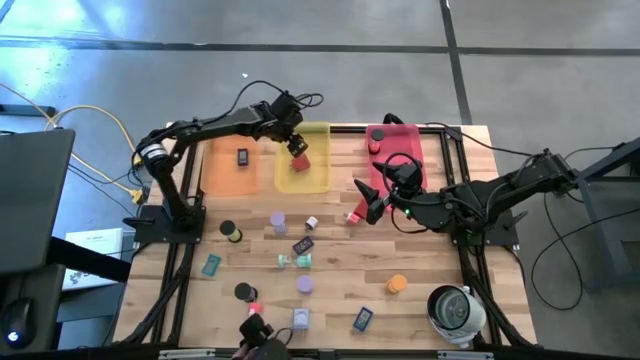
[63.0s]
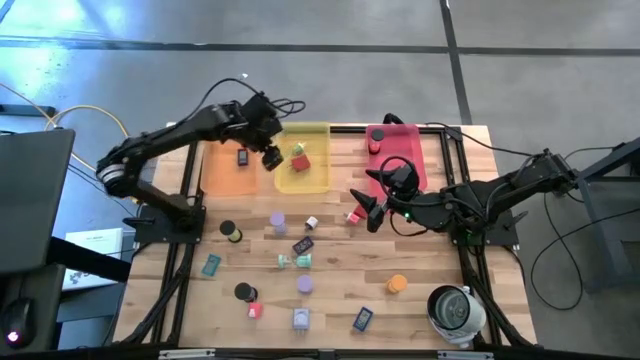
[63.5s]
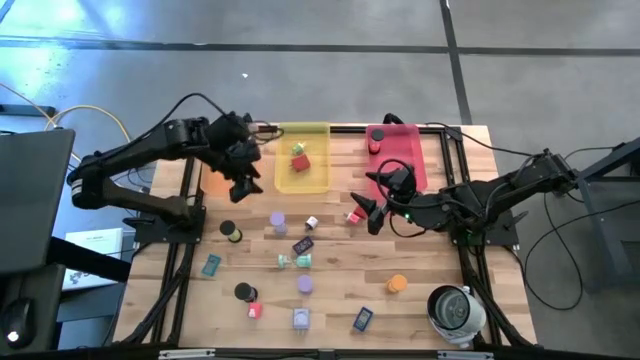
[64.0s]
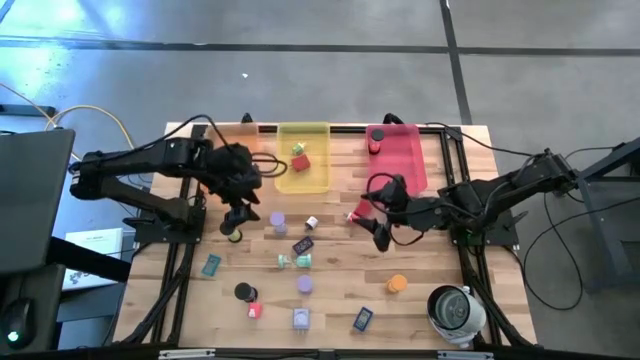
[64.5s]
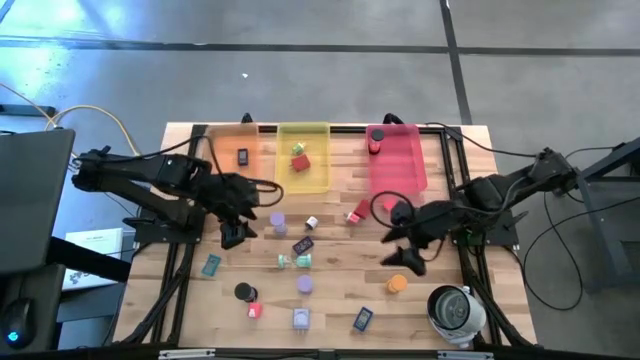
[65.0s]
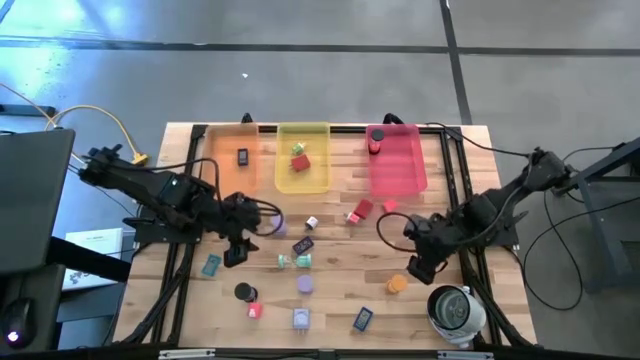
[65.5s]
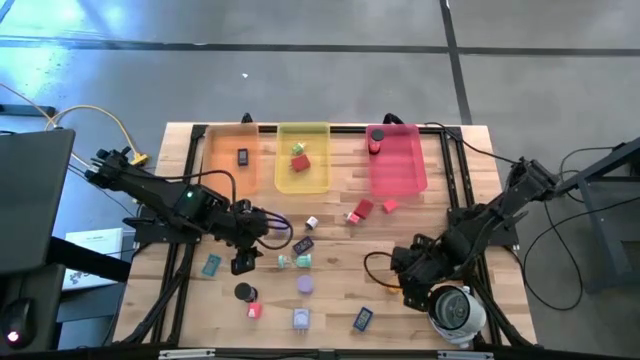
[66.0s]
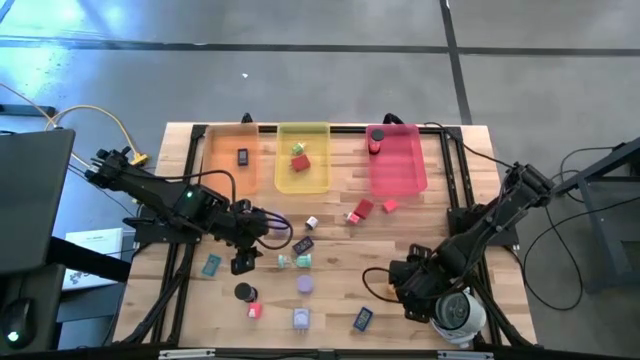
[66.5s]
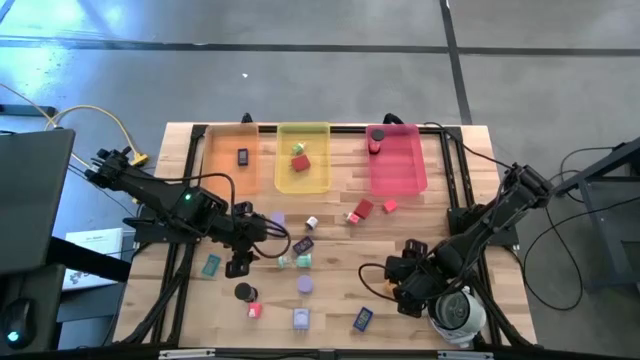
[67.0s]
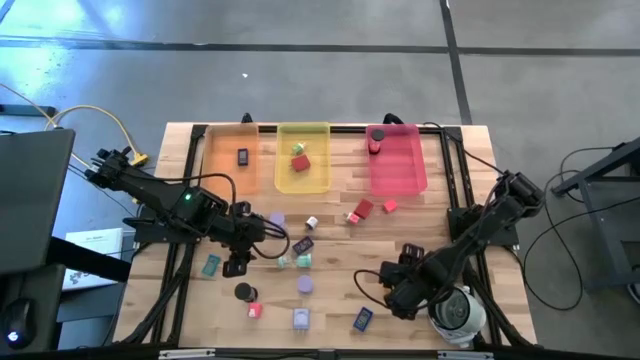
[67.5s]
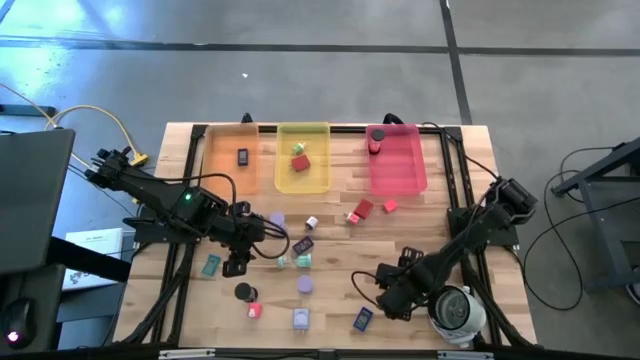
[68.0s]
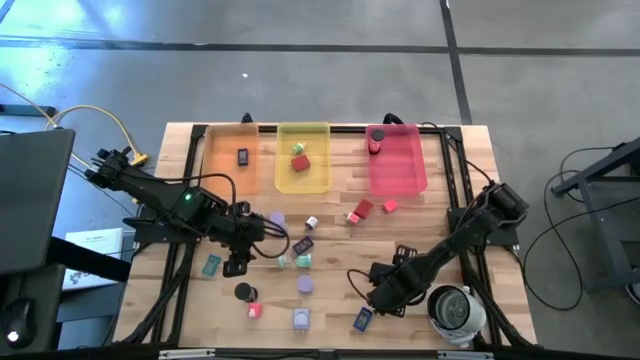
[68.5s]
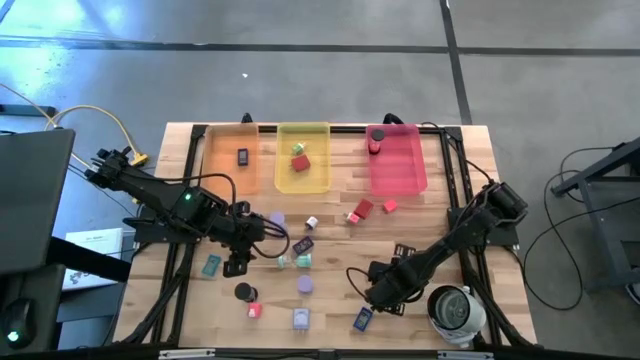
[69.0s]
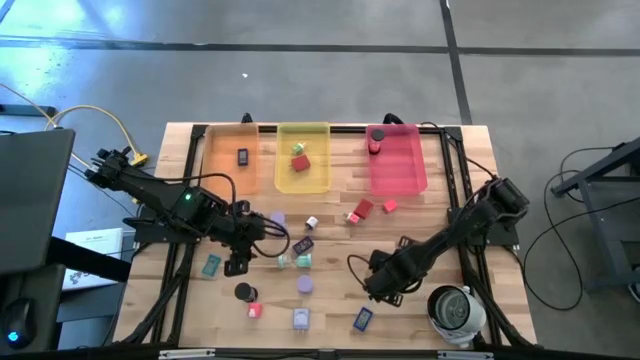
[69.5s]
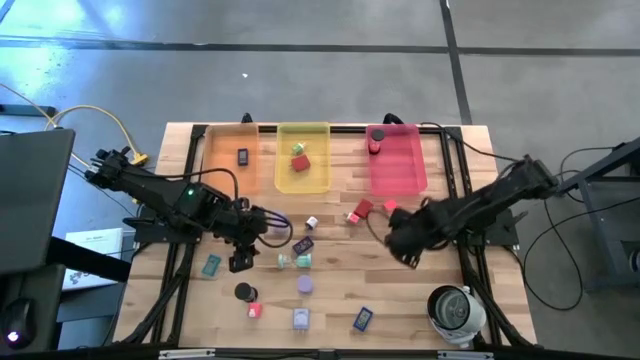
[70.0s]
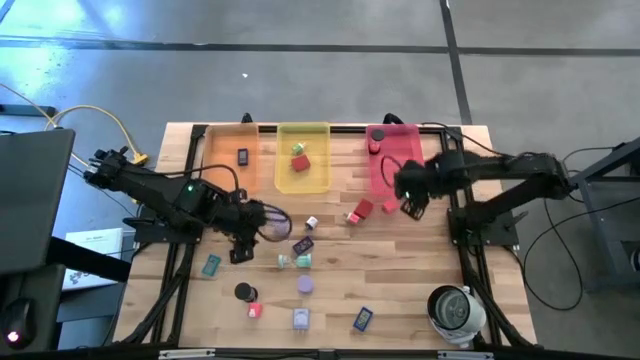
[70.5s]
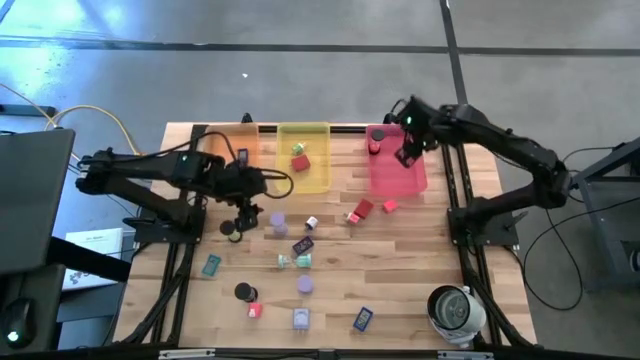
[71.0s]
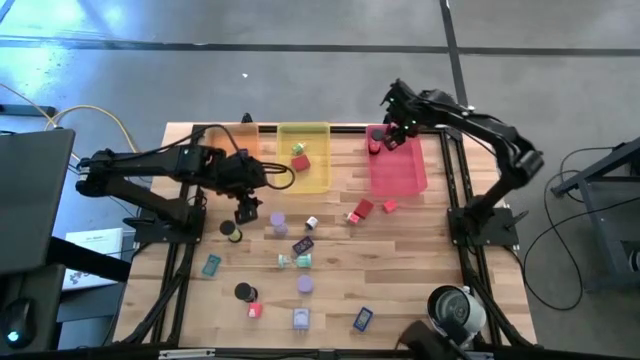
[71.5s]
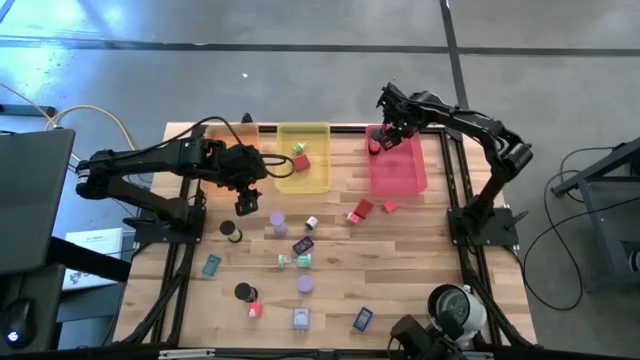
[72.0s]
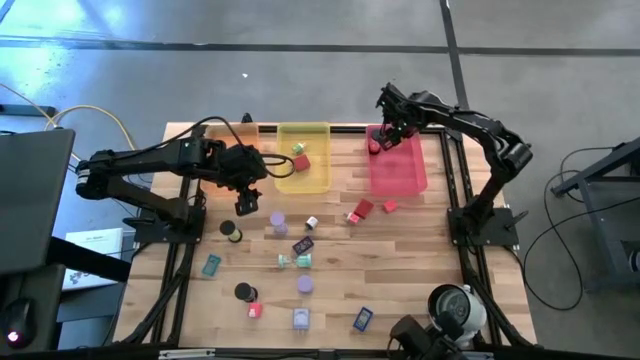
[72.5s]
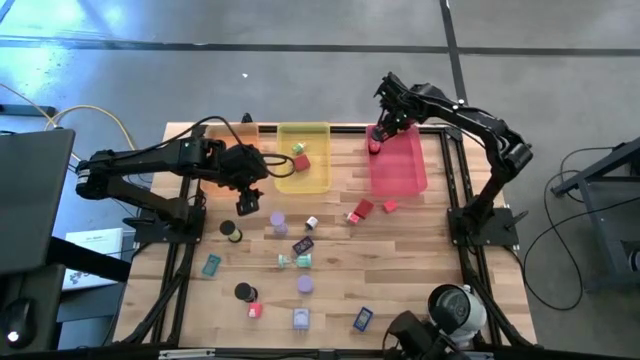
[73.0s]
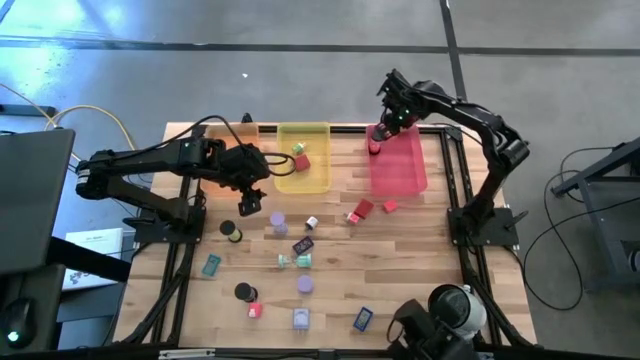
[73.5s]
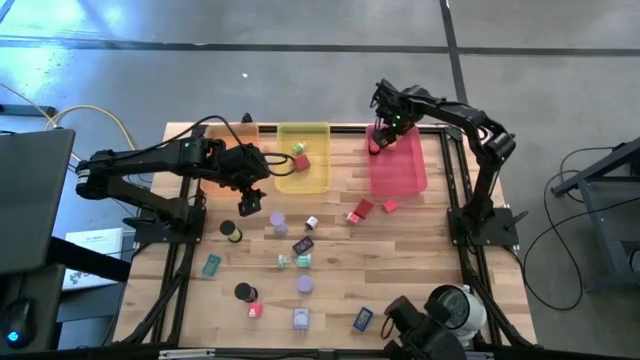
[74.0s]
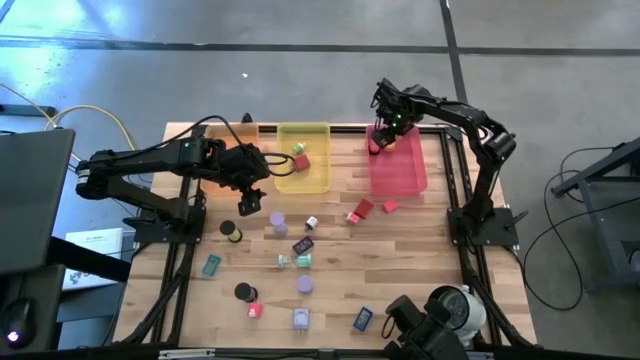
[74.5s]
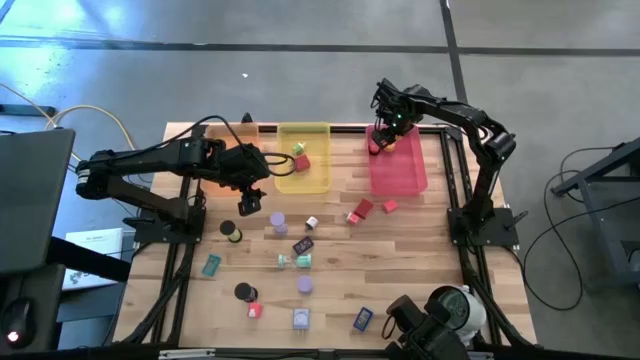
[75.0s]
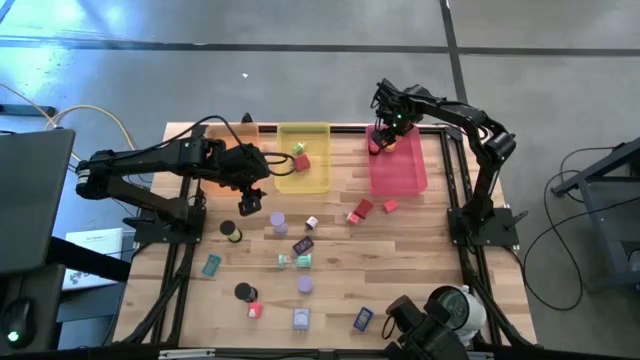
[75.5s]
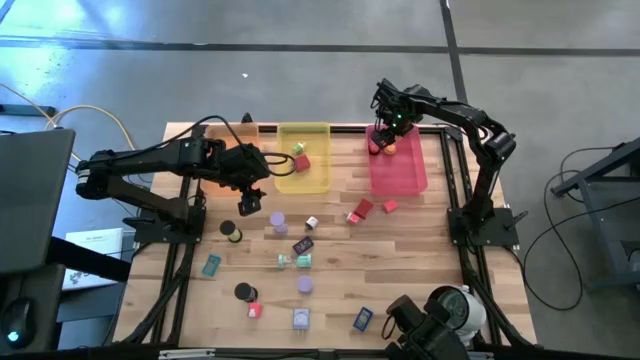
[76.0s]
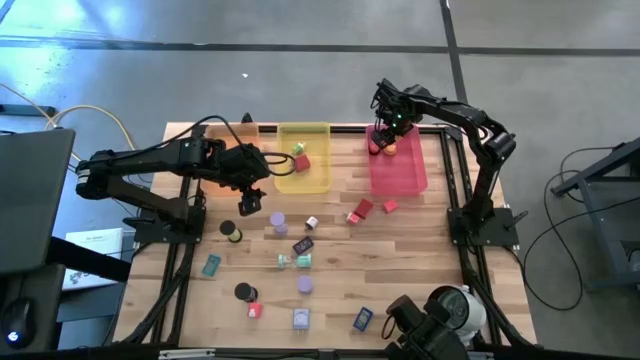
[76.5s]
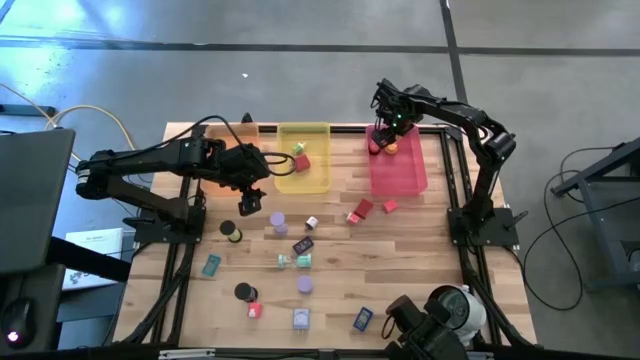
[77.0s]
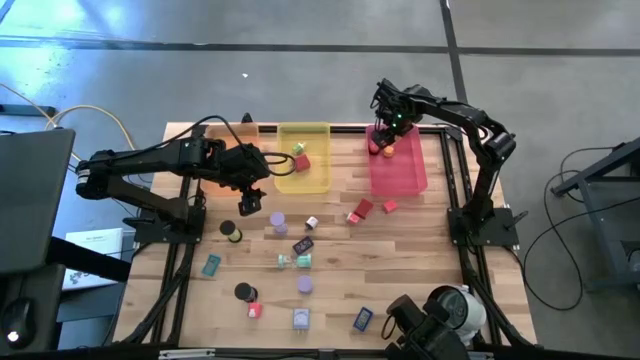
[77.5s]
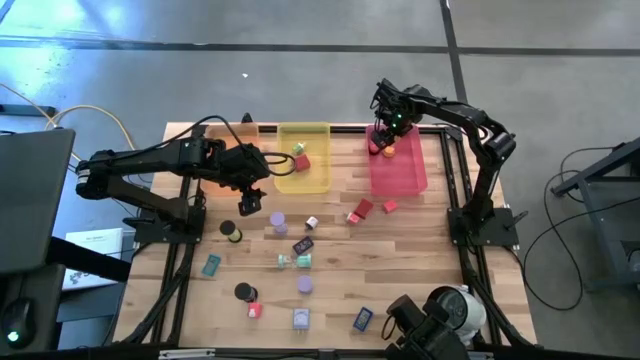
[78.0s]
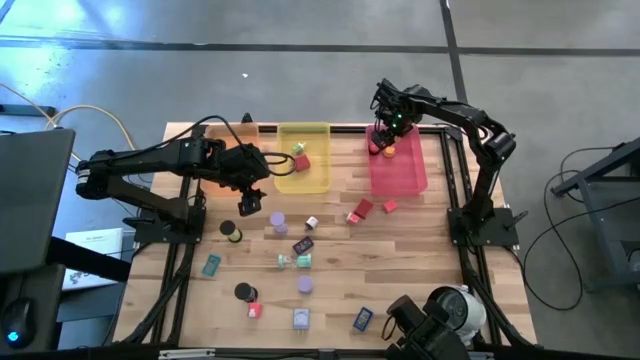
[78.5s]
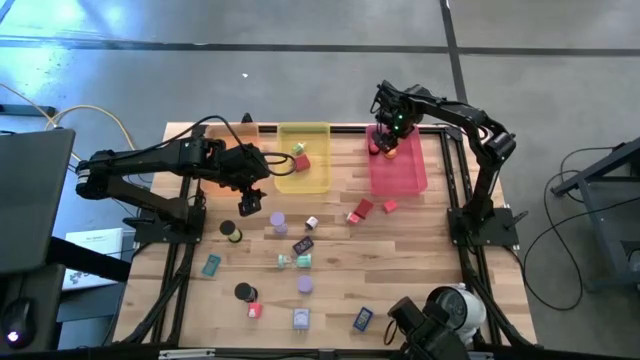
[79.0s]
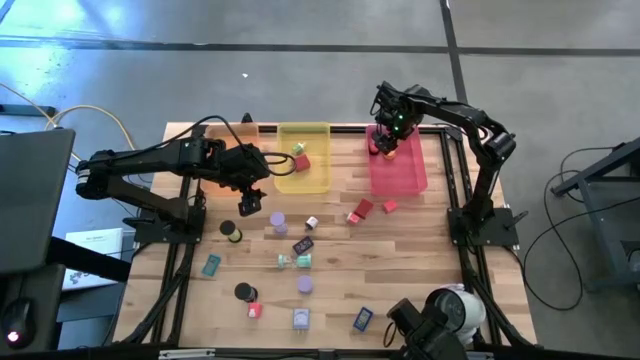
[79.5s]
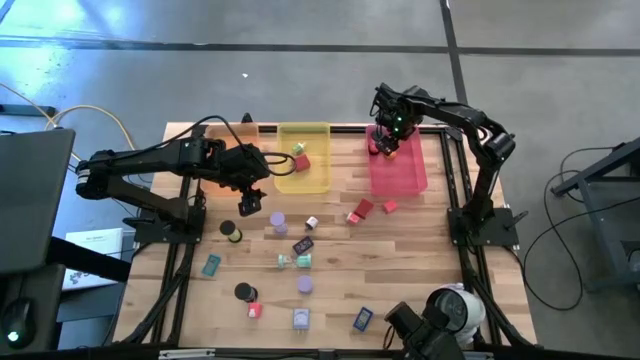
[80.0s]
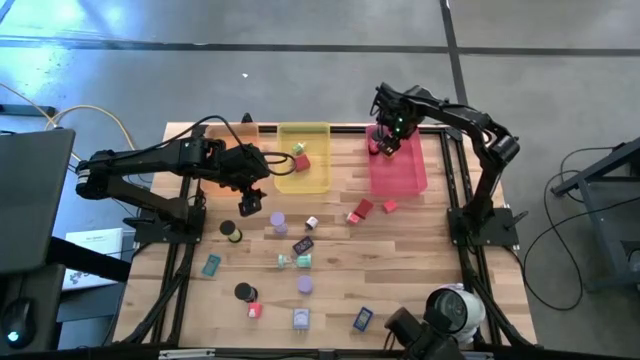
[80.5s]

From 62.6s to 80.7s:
Task: Pick & Place Office items
Put the orange sand timer into the pink bin
